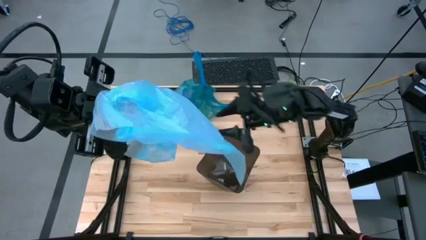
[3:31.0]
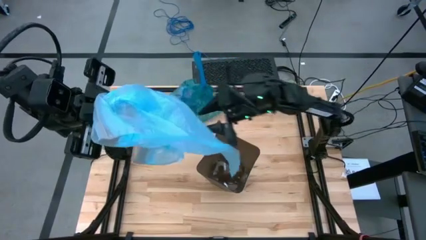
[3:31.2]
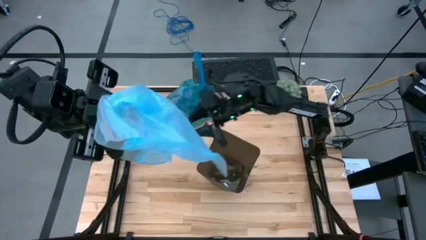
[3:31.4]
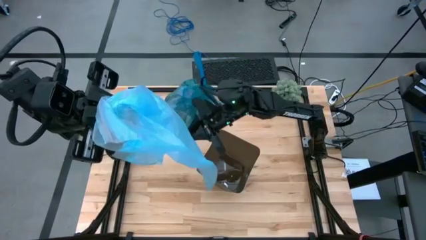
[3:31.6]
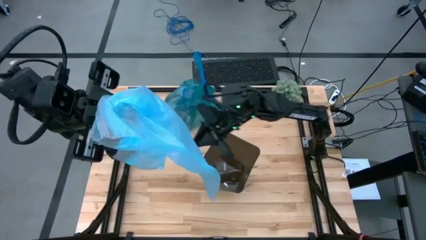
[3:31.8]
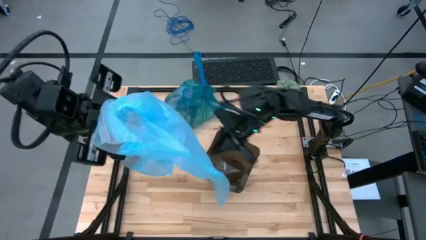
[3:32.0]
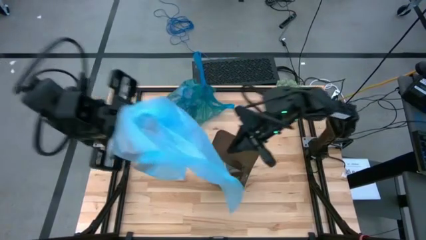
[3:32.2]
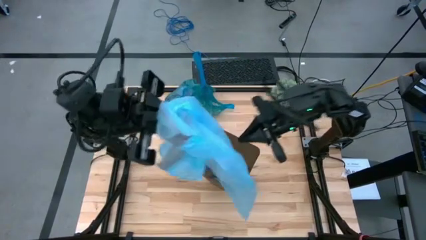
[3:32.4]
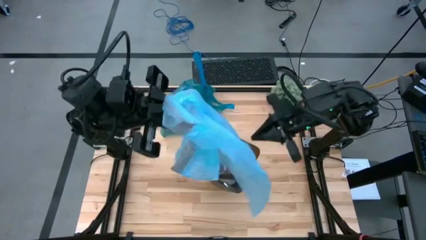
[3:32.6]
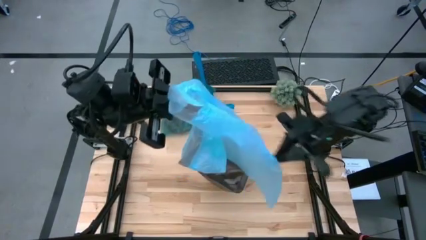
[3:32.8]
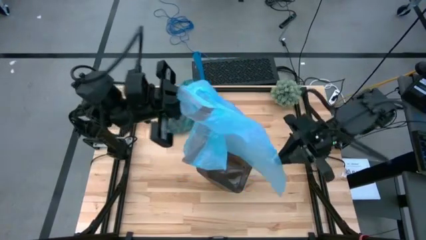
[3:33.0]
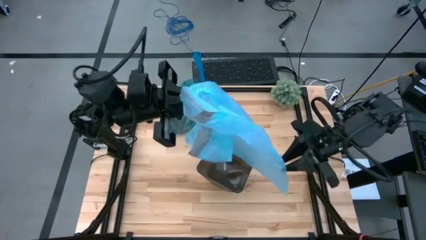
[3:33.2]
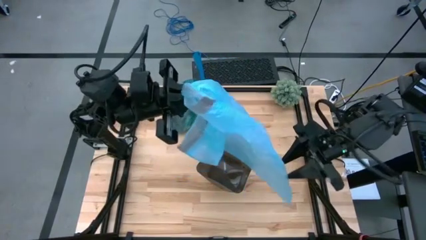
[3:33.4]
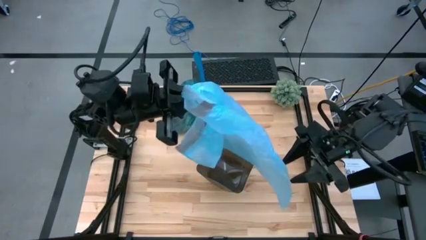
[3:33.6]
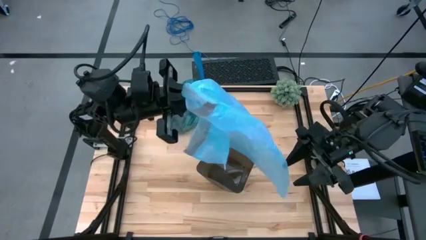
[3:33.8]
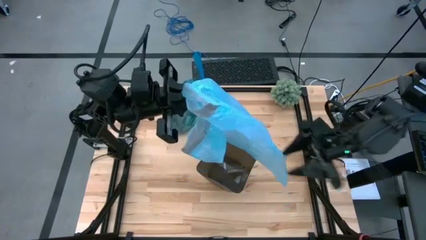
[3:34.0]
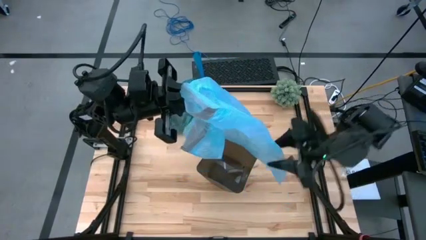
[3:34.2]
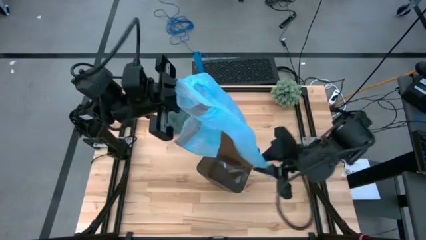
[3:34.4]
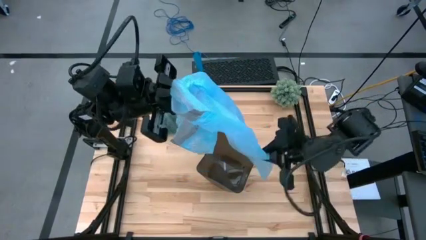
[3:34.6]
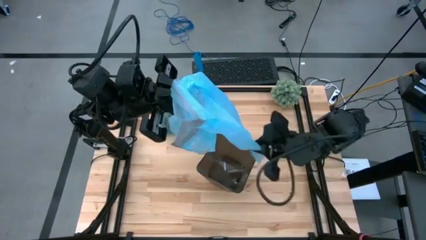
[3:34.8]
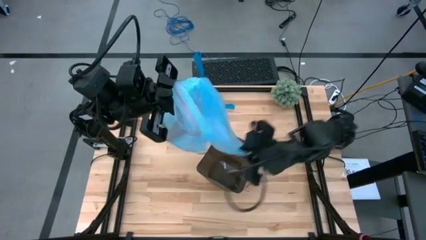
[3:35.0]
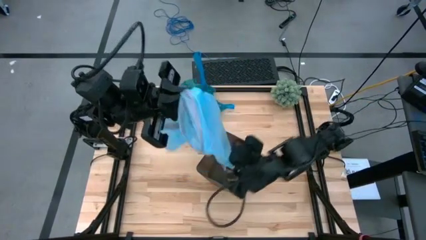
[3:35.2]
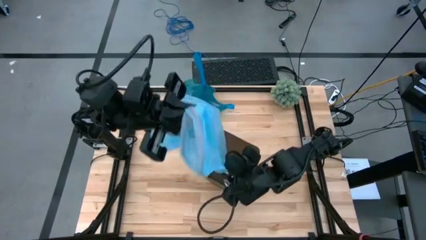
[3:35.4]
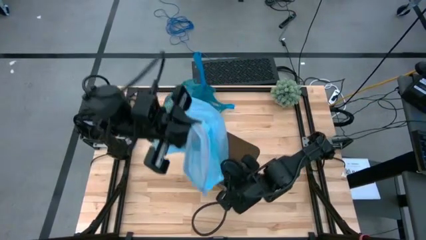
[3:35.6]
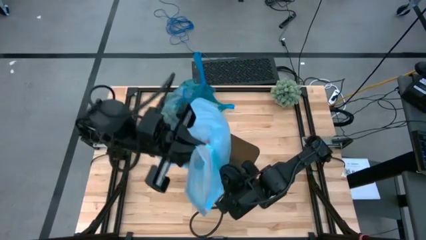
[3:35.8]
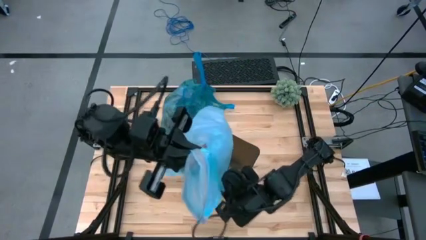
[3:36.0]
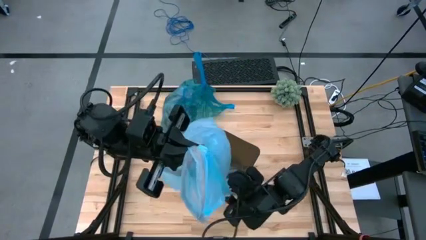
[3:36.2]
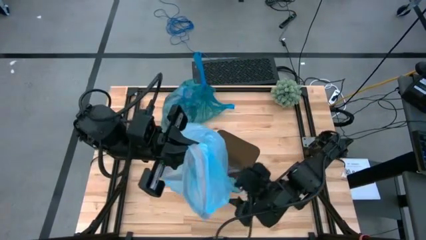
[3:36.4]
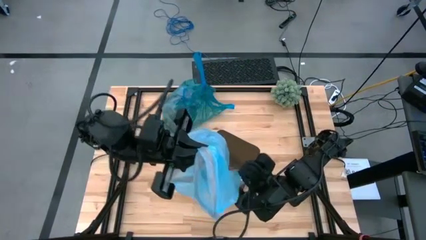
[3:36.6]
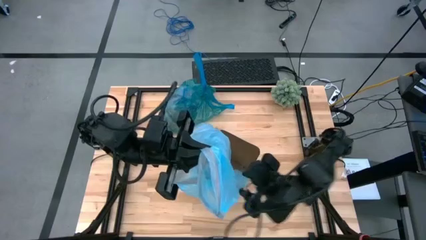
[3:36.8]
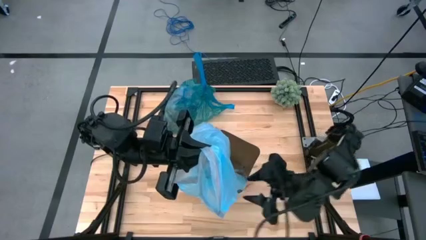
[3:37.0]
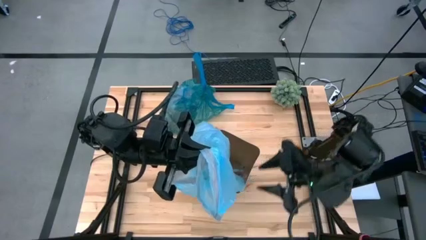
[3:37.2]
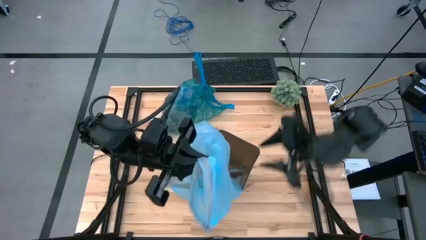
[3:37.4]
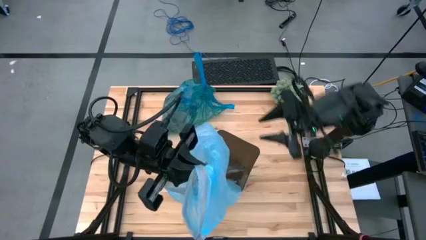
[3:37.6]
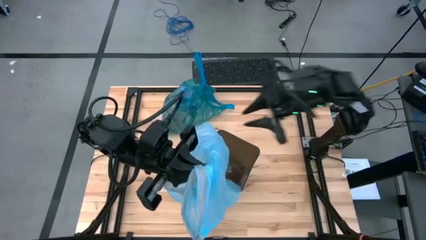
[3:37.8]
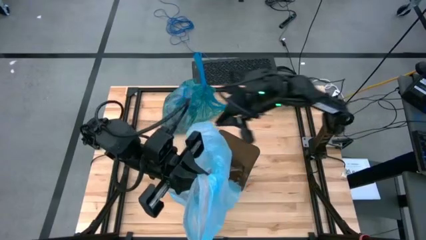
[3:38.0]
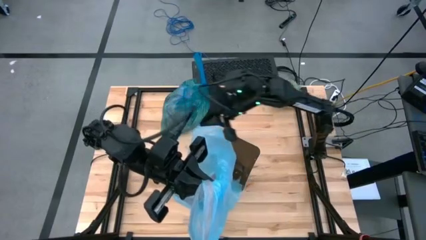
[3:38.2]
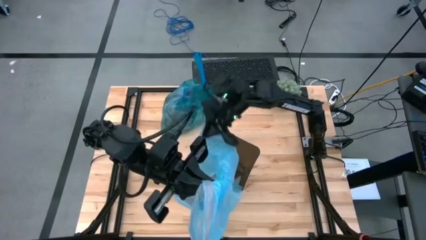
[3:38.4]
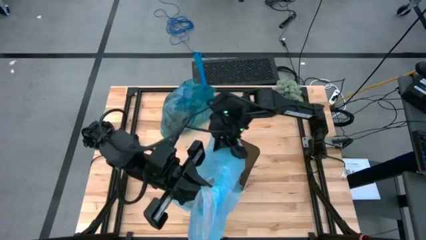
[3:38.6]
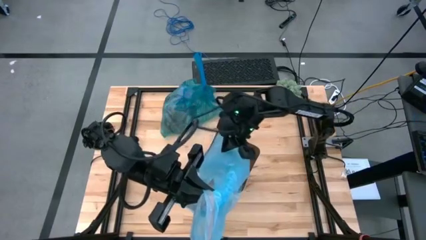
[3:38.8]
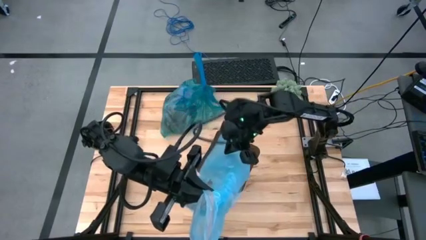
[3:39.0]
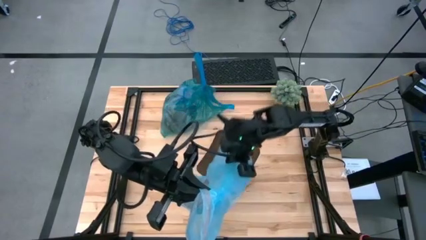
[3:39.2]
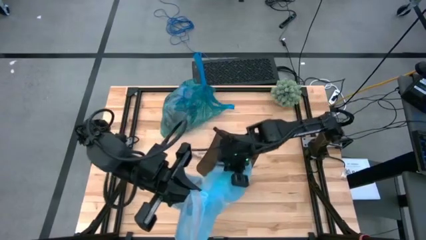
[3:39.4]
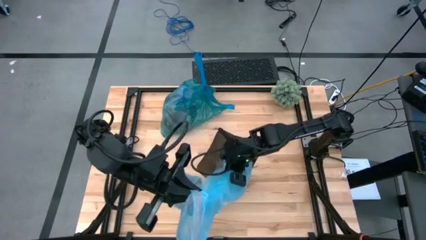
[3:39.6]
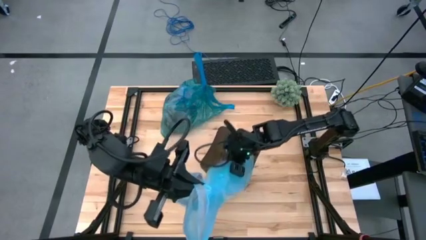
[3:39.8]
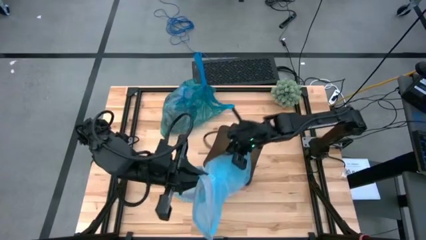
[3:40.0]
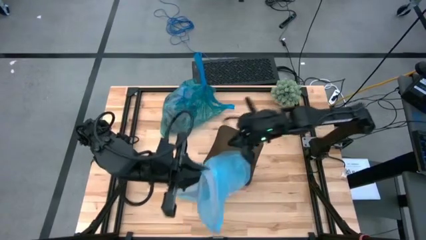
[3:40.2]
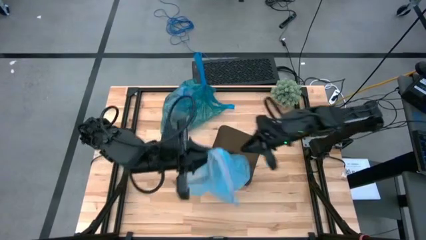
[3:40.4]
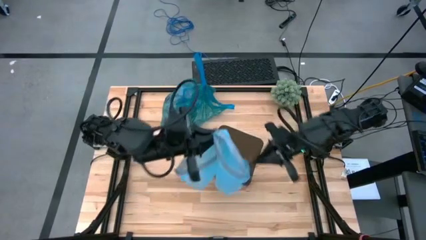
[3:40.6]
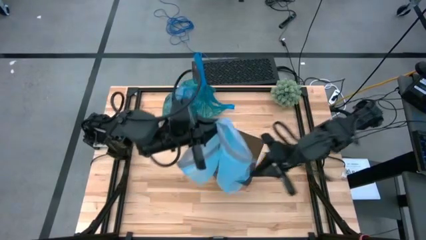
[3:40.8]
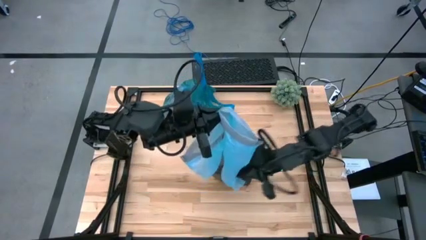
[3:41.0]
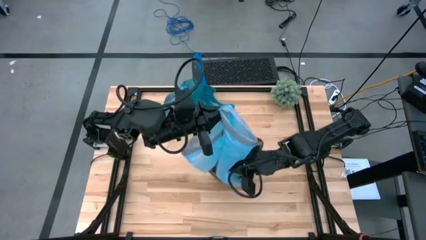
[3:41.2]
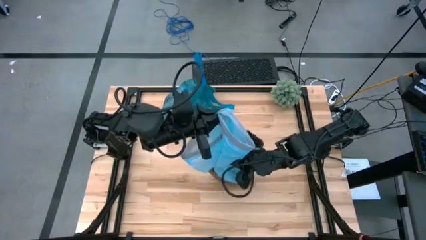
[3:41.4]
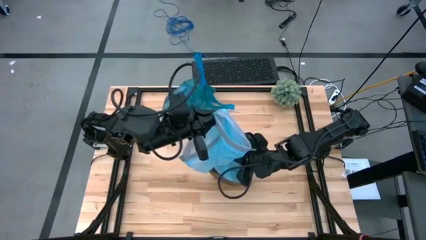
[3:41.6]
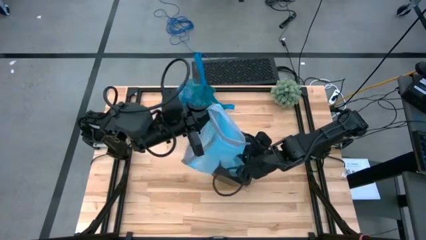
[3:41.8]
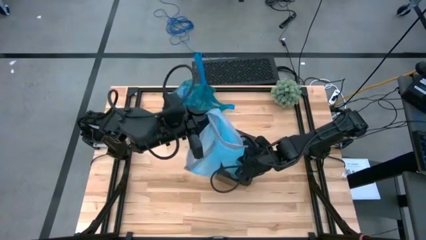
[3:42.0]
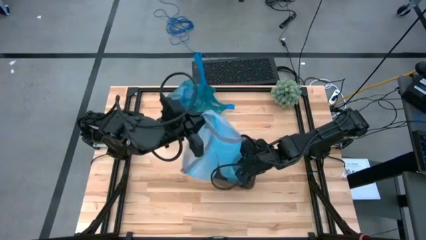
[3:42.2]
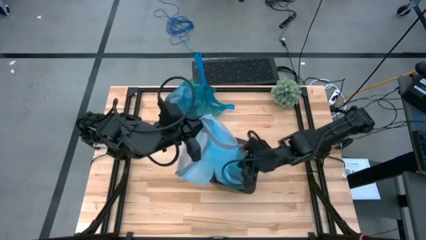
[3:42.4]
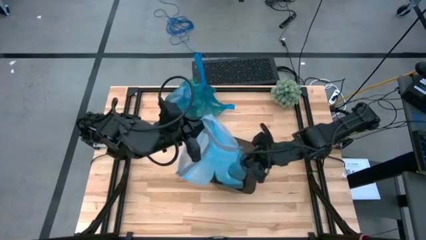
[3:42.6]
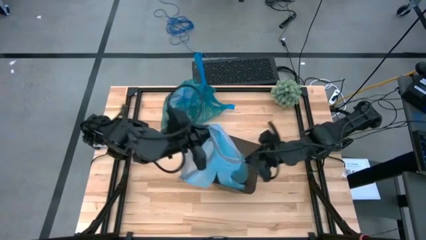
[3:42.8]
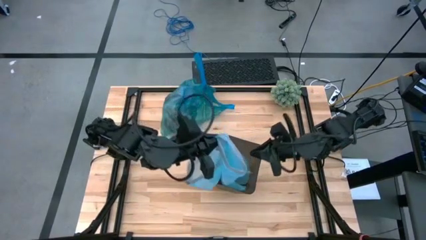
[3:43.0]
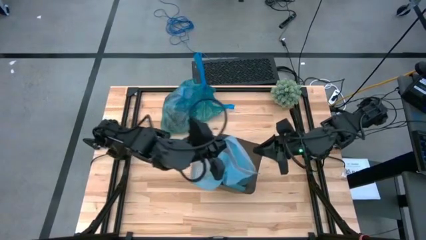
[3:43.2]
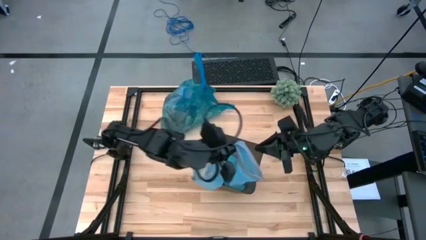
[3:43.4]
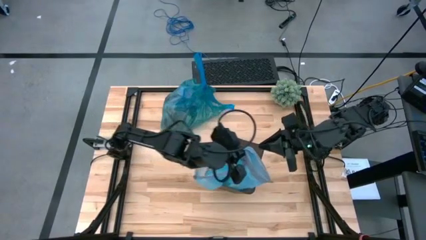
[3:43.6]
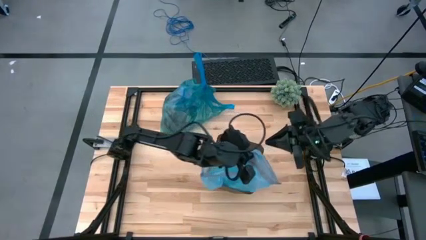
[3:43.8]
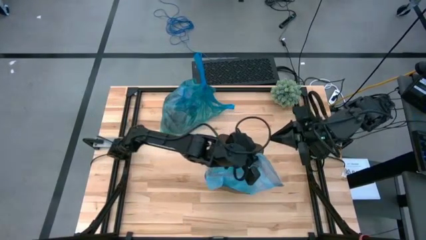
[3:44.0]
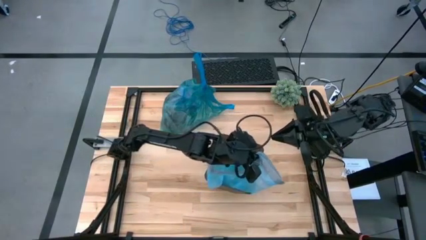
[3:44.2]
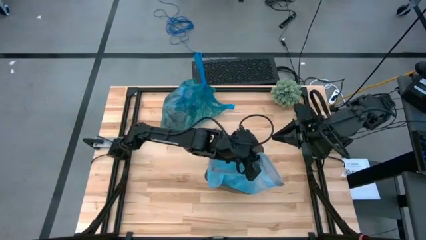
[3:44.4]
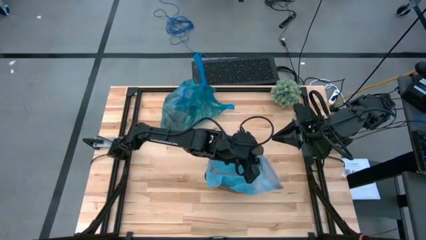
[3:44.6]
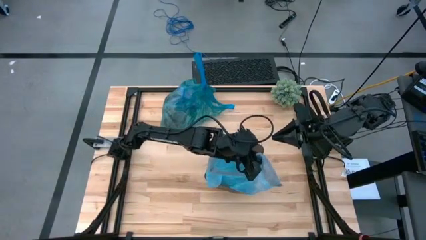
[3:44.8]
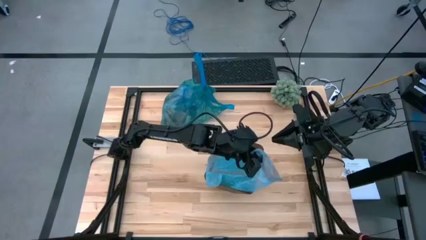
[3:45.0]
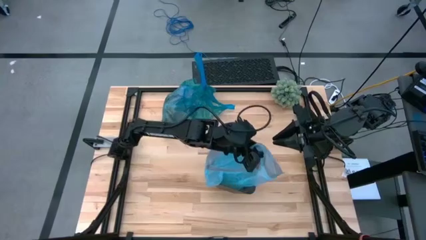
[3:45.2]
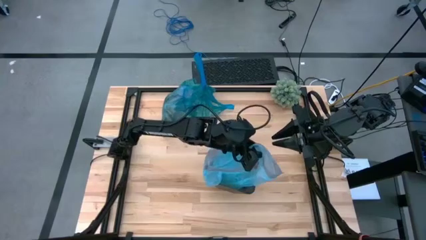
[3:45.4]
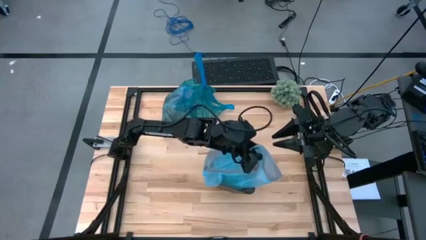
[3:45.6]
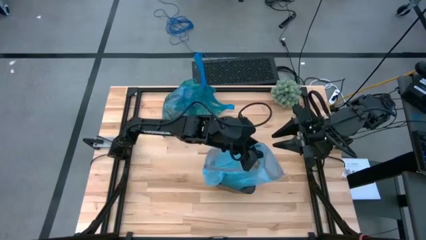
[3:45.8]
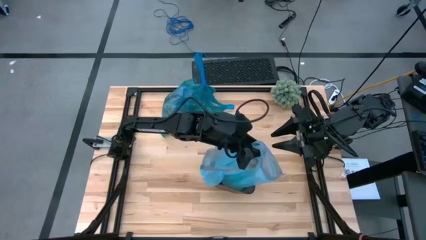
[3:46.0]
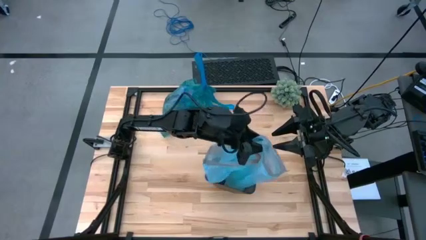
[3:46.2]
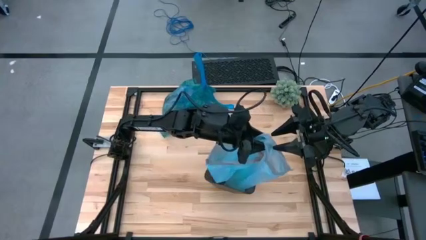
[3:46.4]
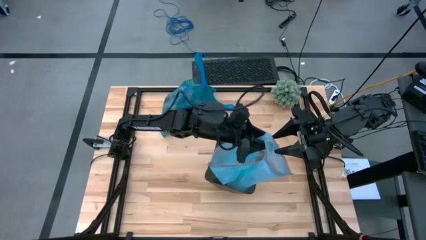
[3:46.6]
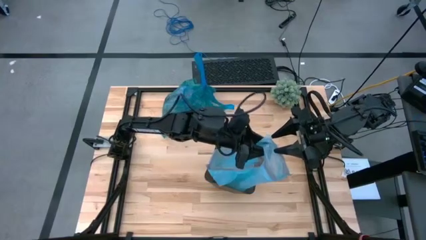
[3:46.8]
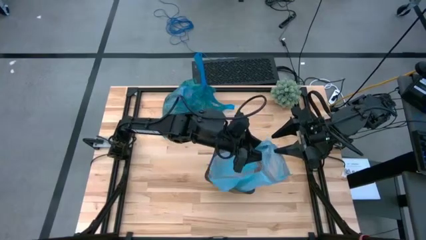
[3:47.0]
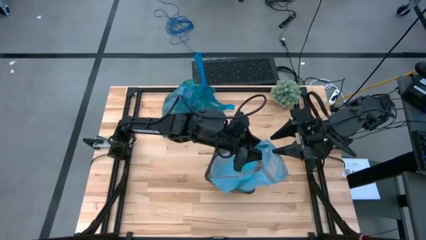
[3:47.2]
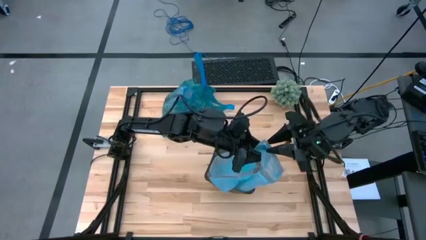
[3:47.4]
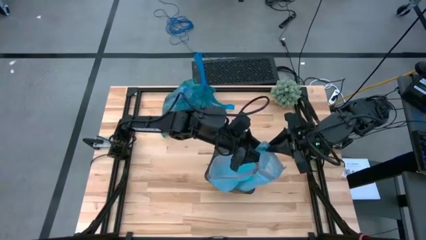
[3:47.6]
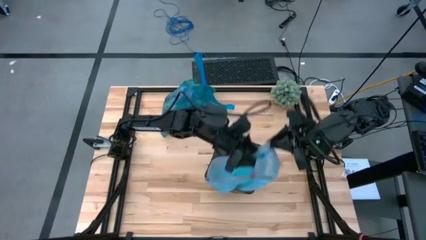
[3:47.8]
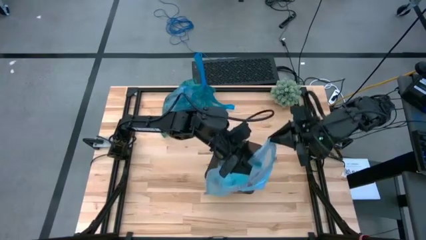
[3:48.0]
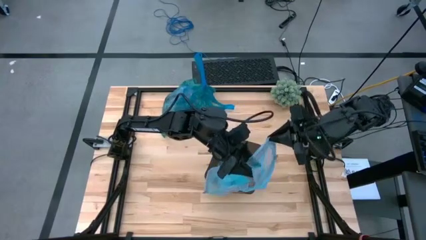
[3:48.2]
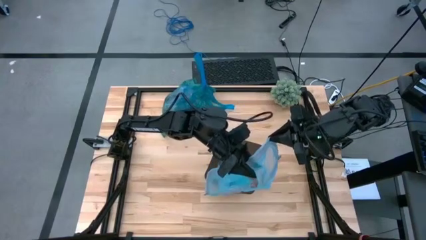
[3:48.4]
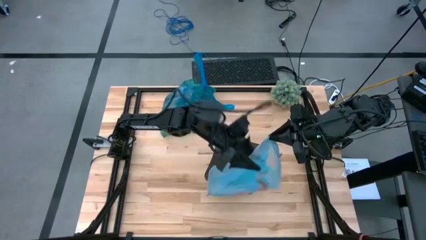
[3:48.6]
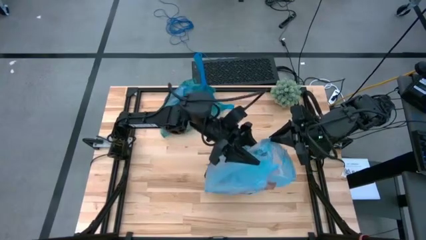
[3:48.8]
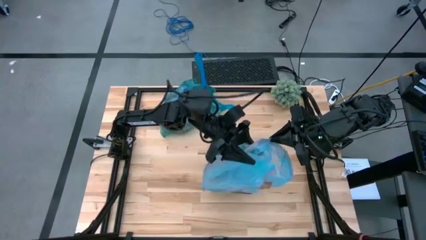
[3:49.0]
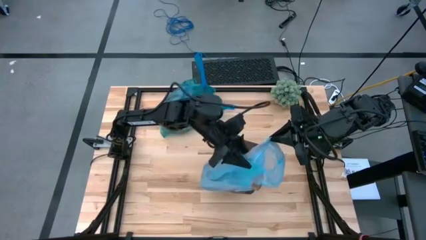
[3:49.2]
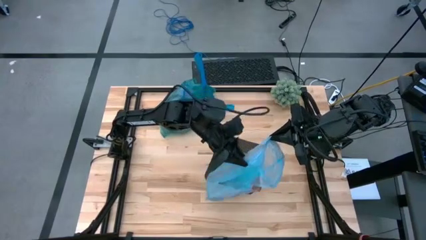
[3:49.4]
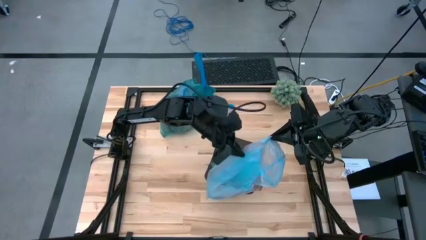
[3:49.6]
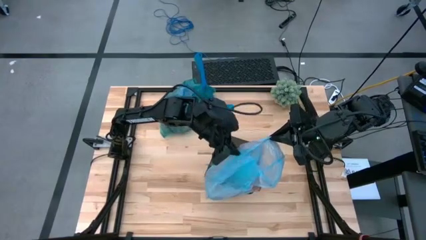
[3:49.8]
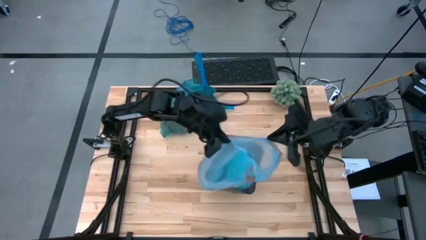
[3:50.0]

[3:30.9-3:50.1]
Task: place trash/remove bag and relplace
Insert the new trash bag into the trash bin
